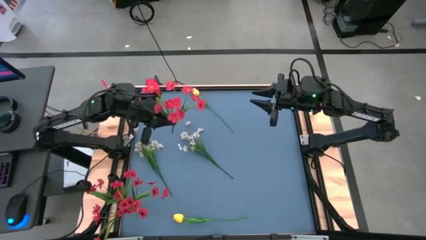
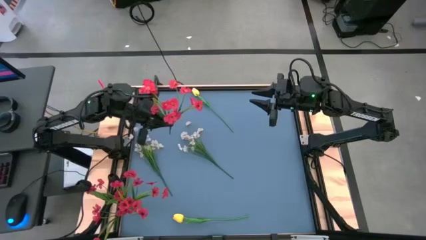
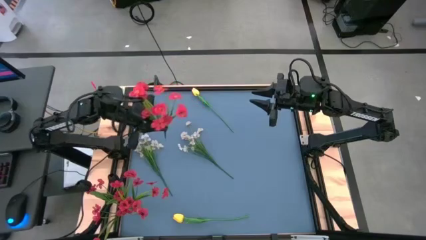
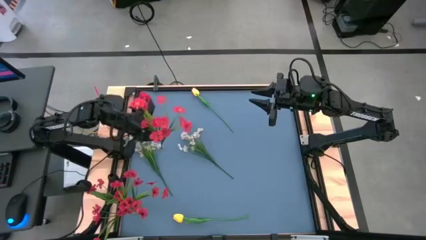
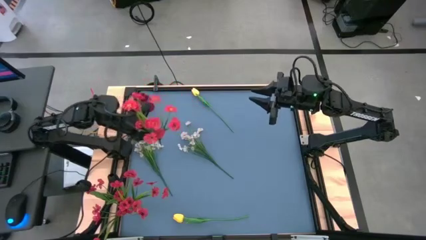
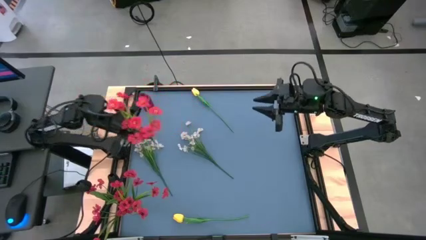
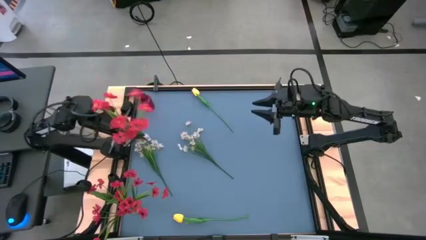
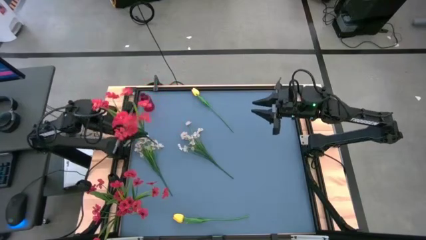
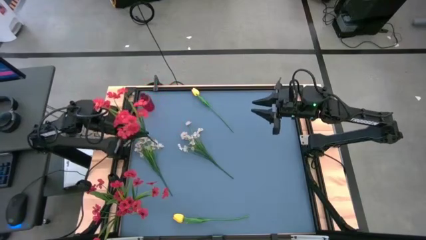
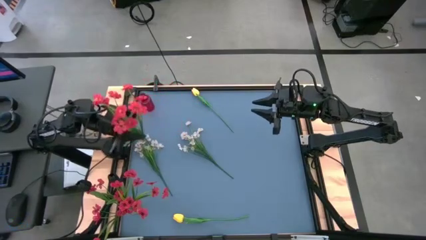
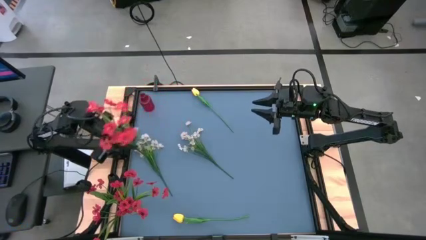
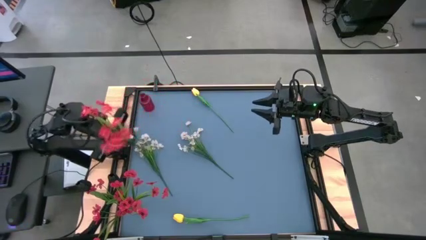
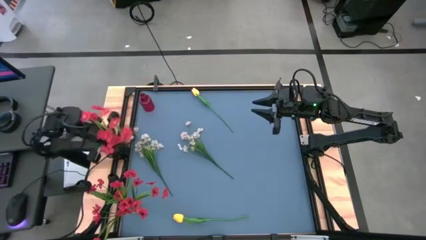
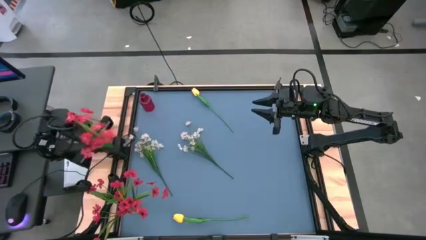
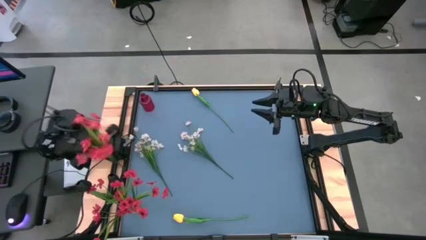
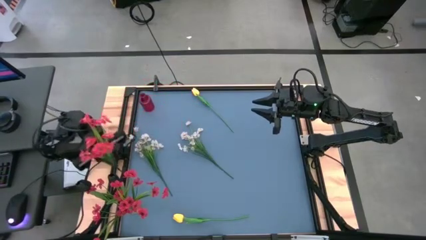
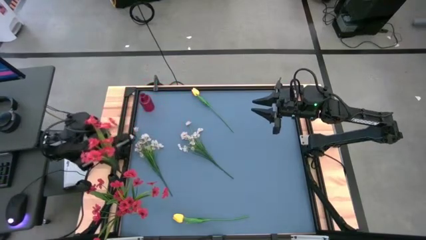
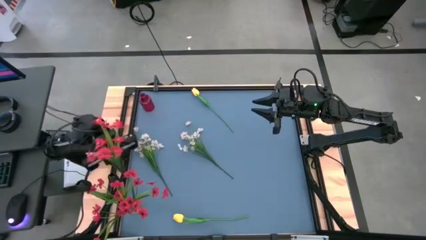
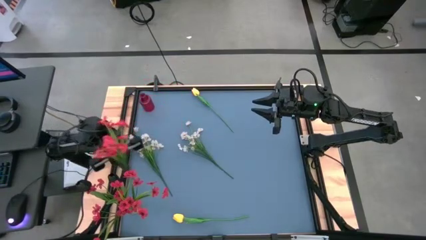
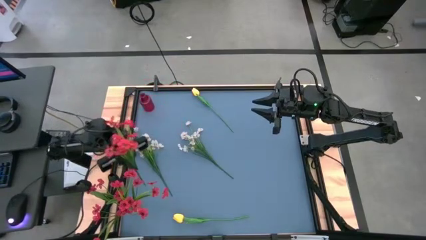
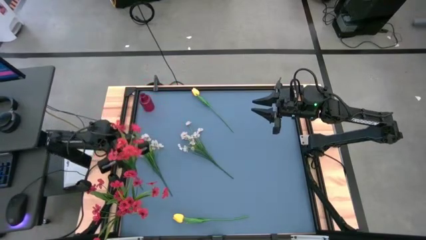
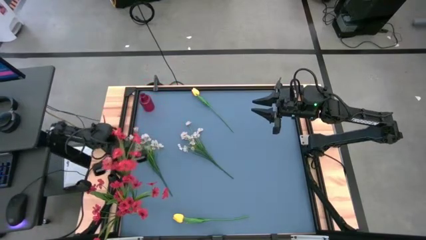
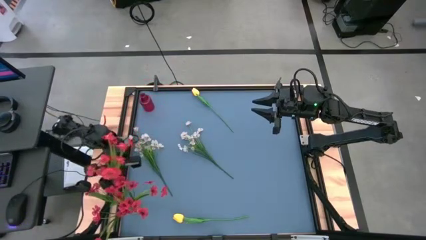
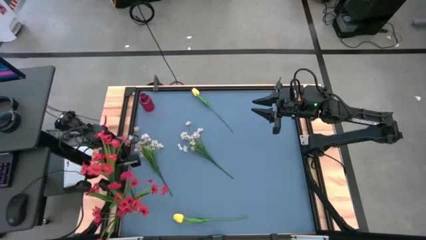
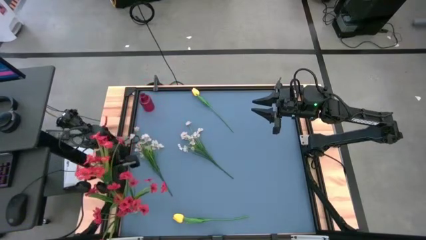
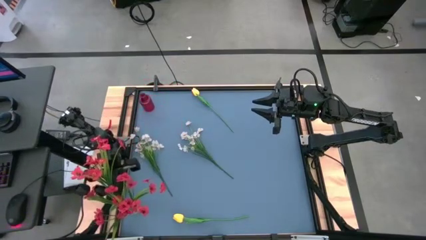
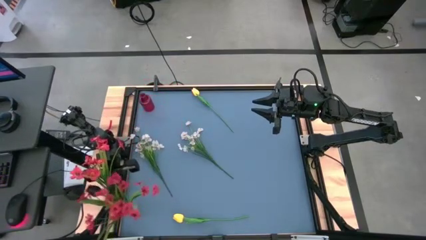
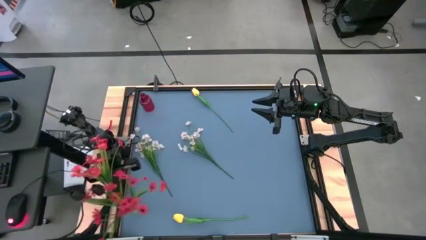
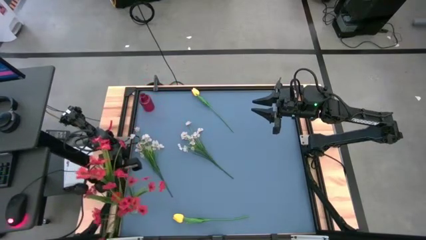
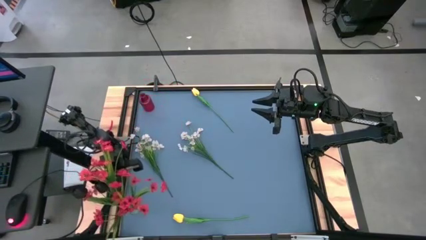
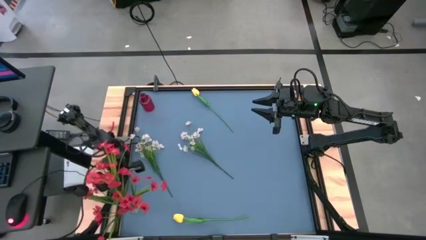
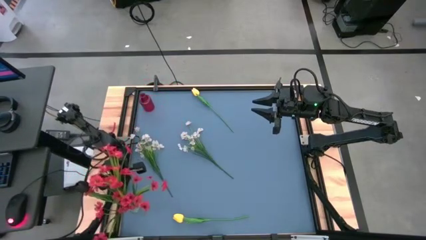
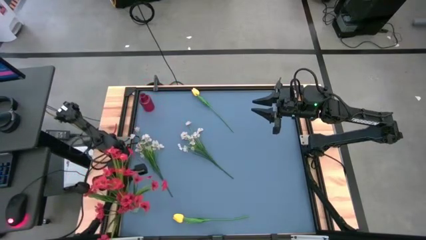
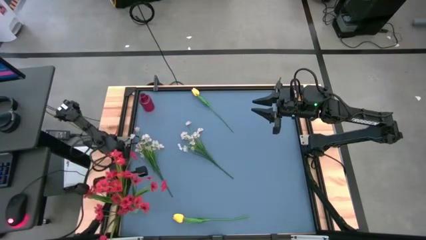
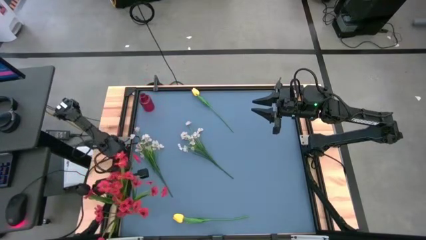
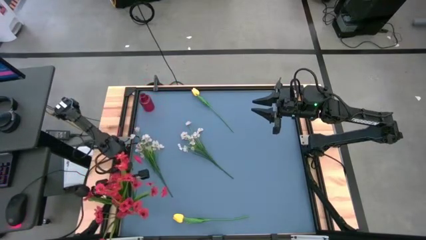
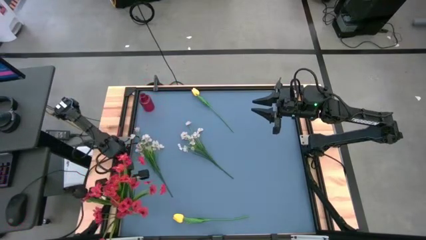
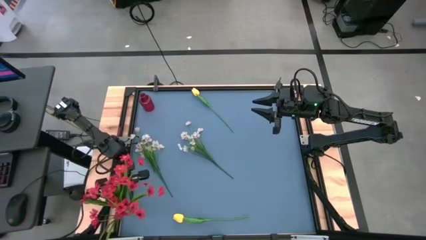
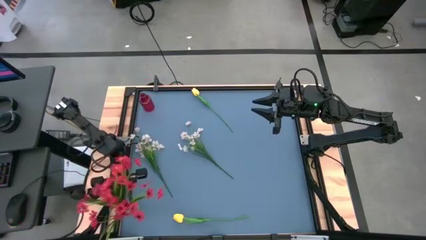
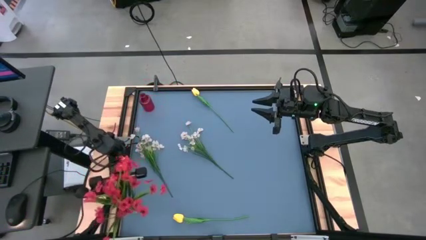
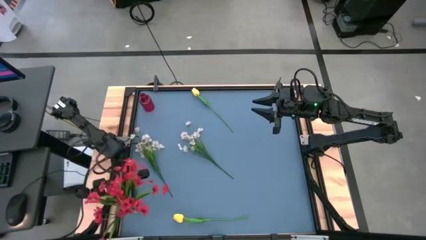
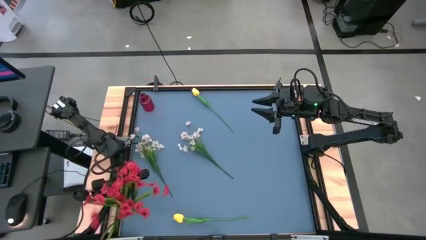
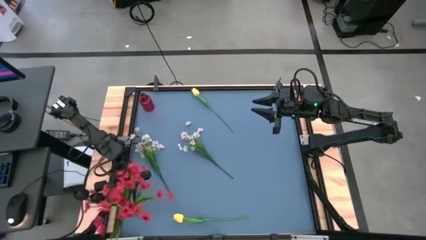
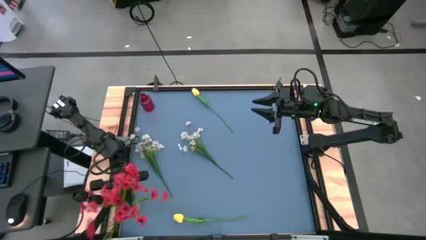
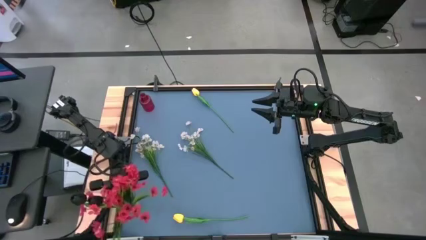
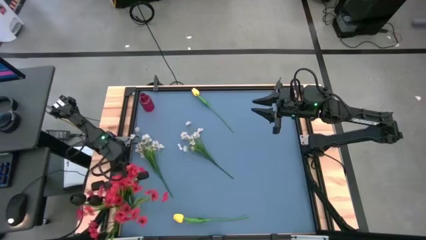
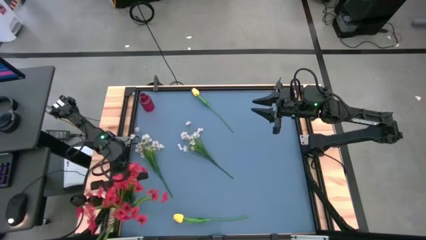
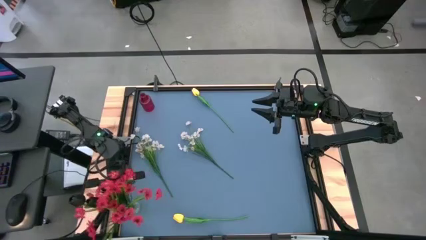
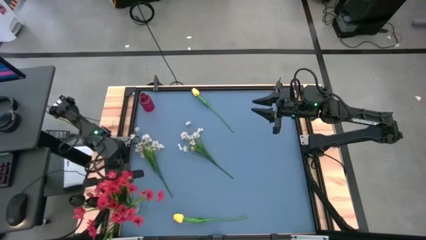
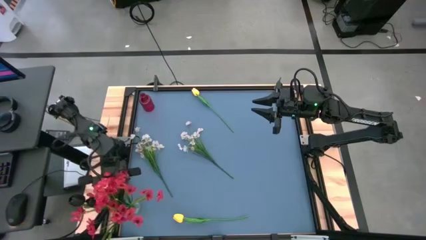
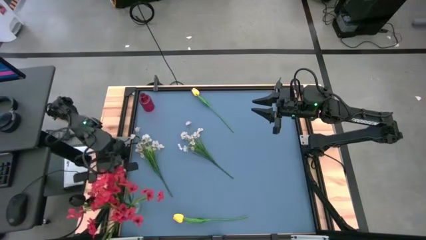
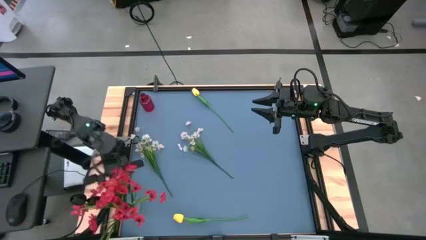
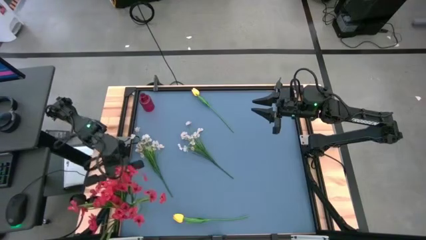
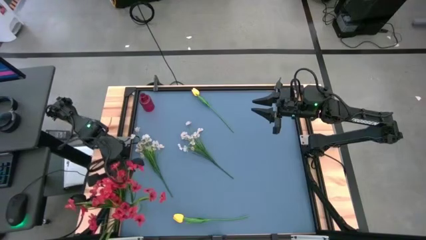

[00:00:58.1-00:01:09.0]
Task: Sort flowers into vase by color
Put the red flowers into the transparent vase

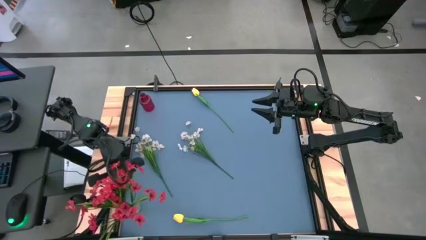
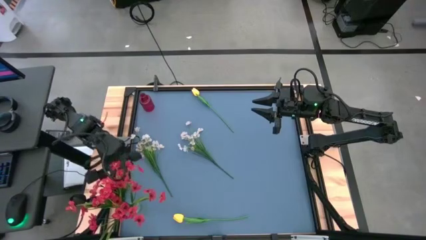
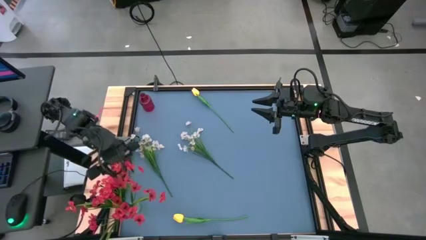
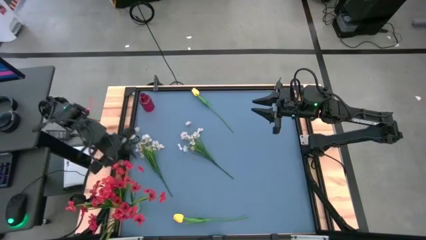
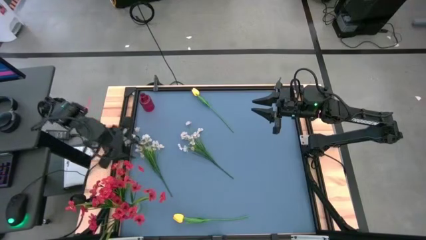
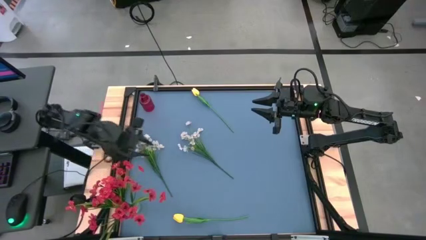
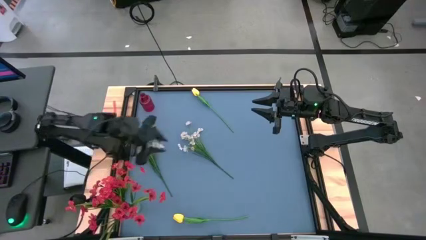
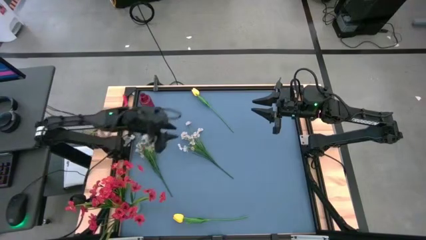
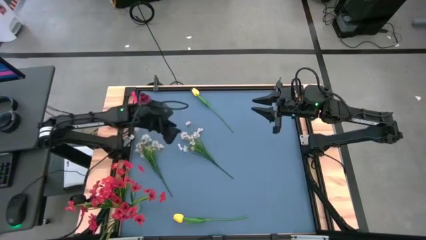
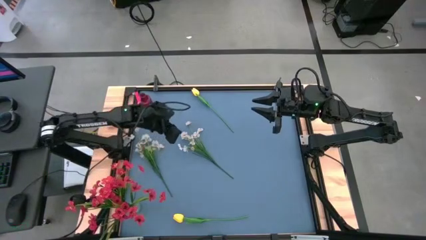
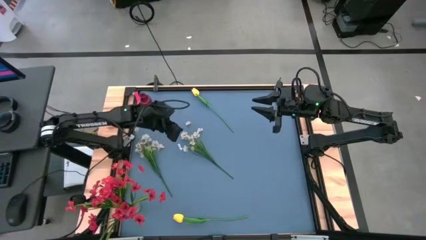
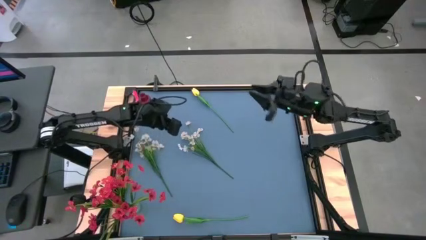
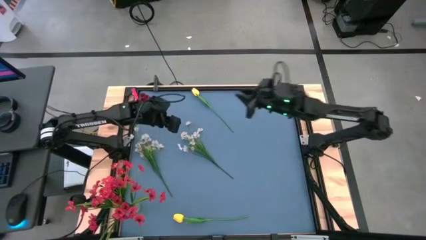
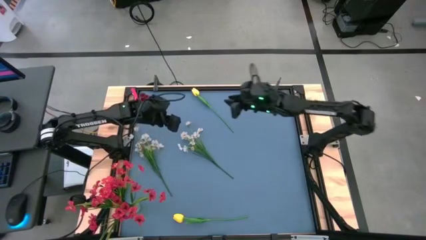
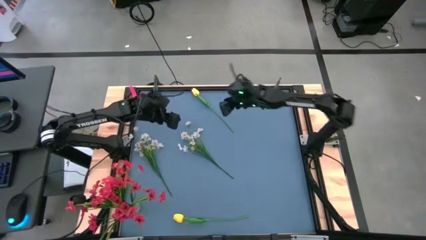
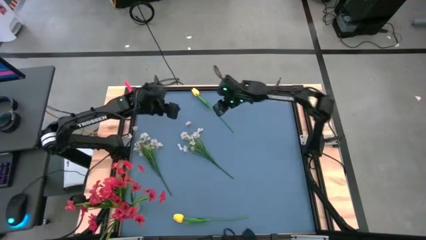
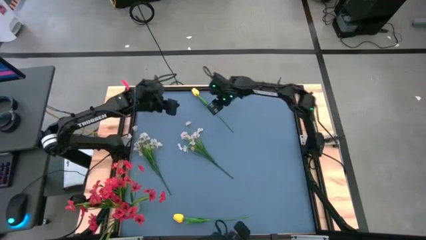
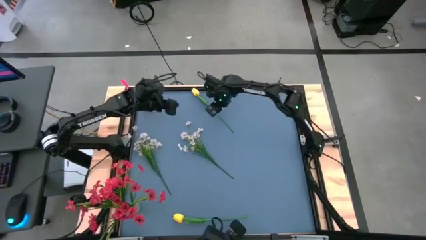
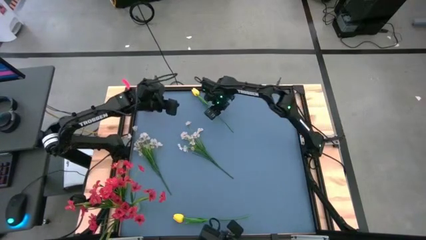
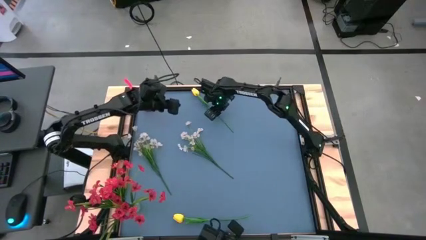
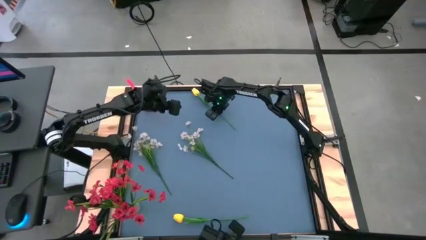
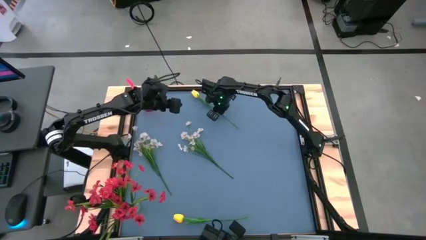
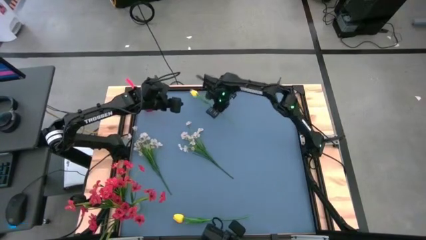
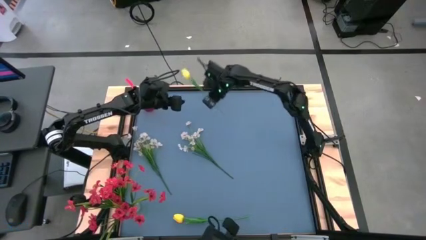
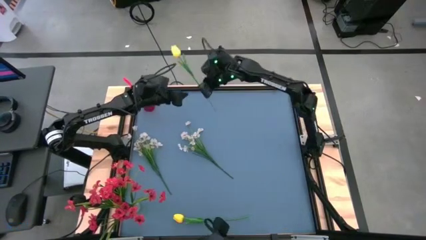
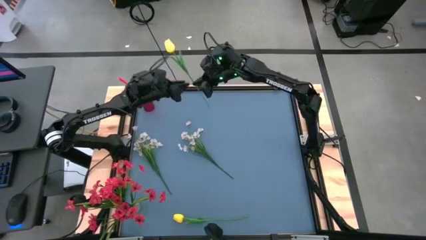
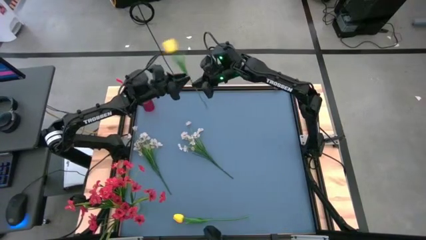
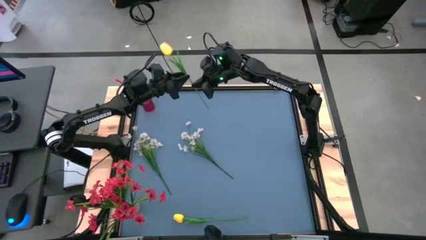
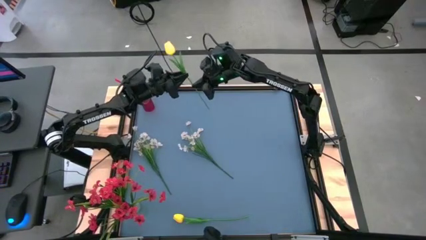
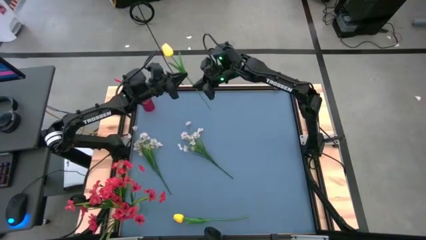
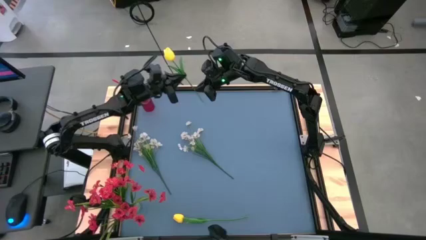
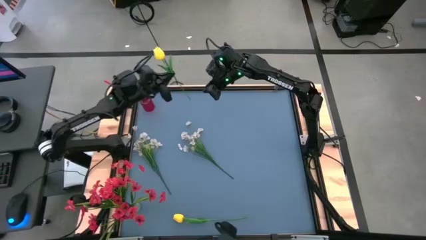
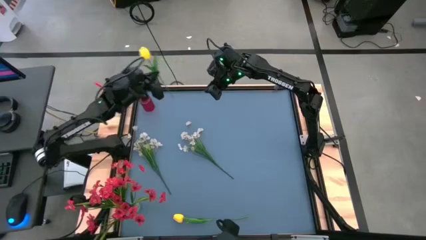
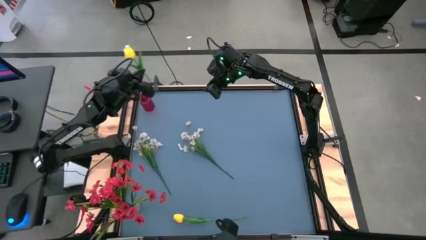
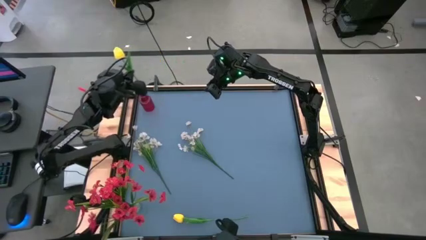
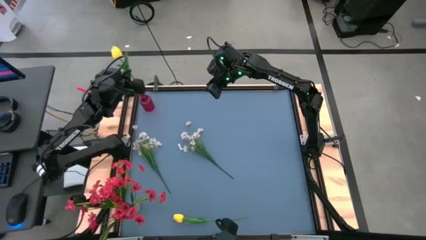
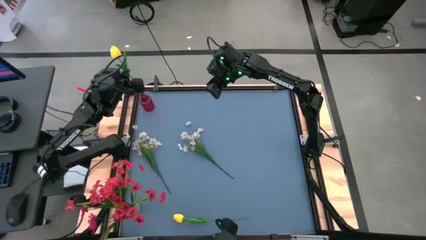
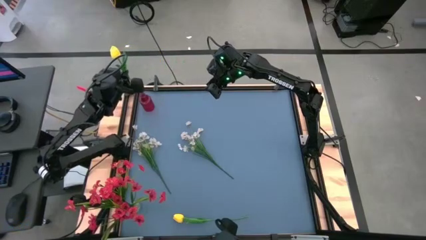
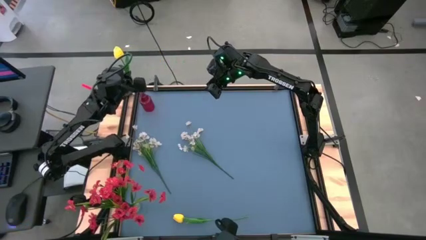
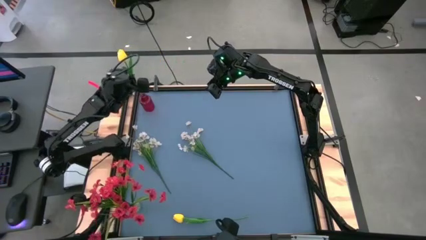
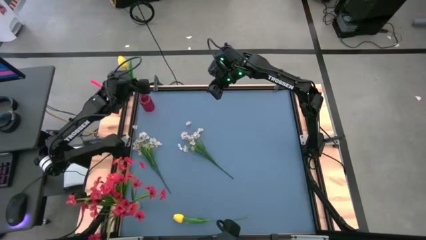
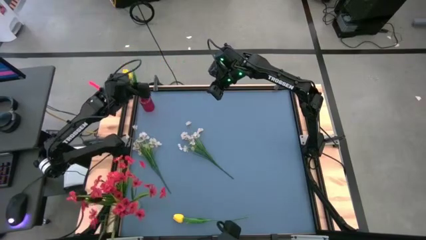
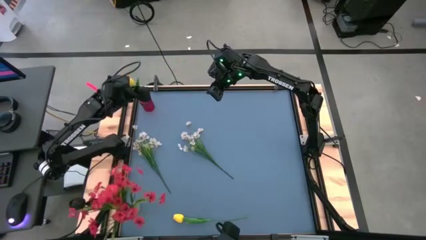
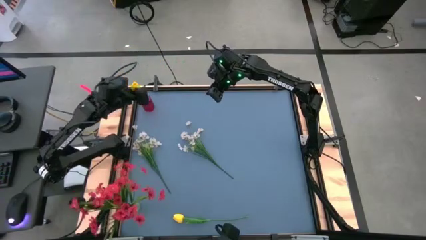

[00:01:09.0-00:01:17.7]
Put the top yellow flower into the pink vase
